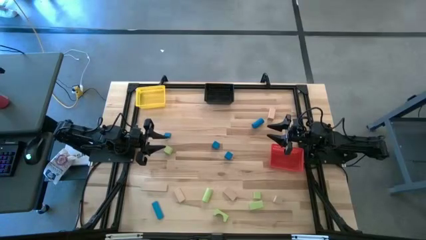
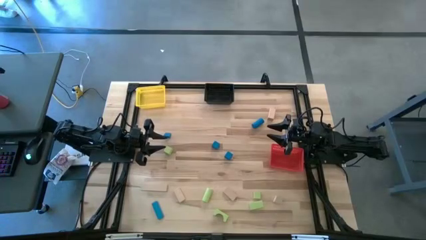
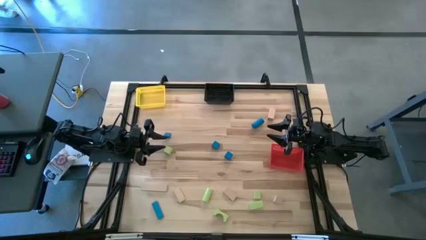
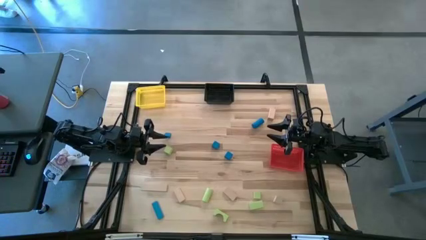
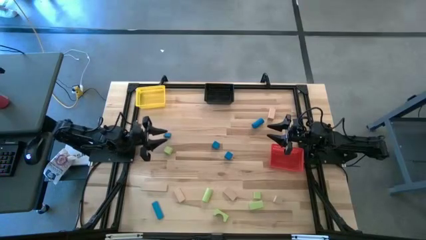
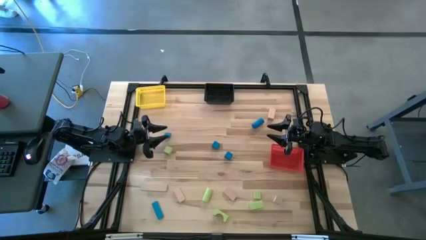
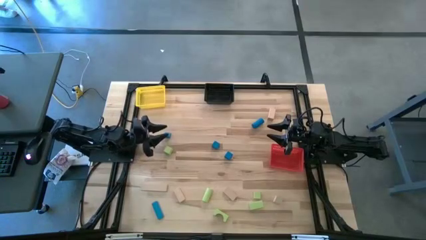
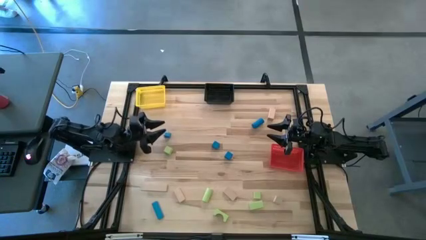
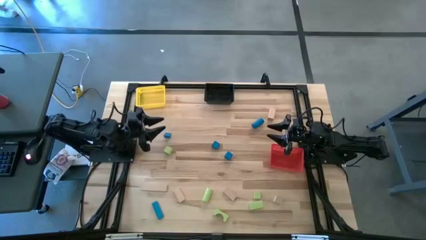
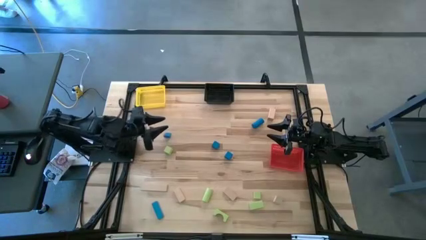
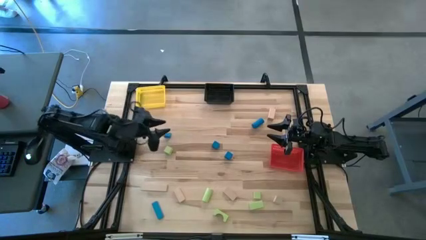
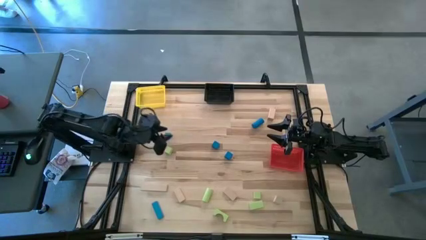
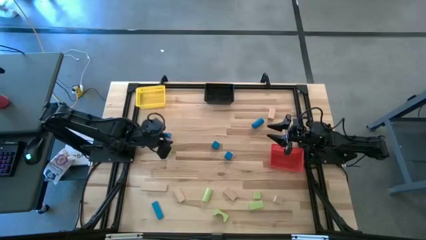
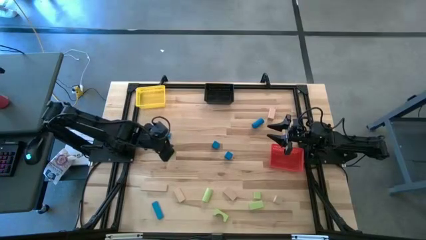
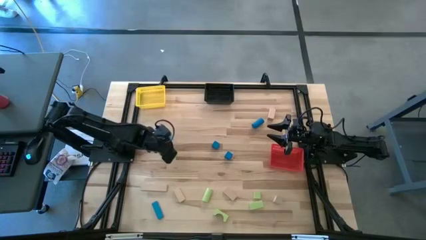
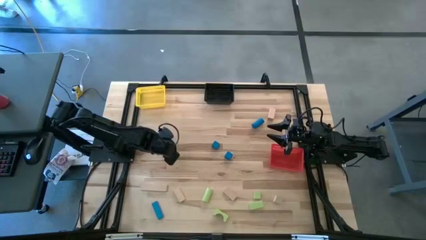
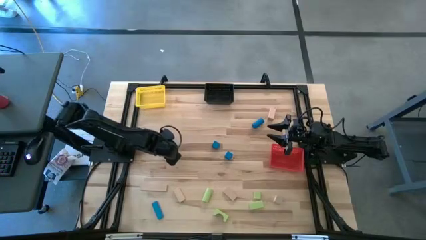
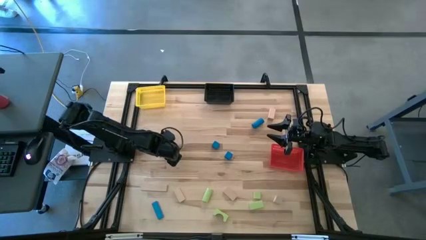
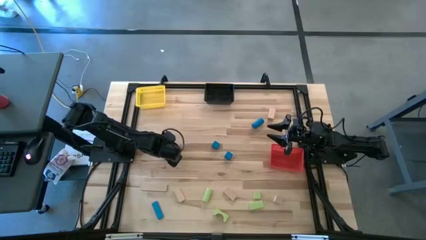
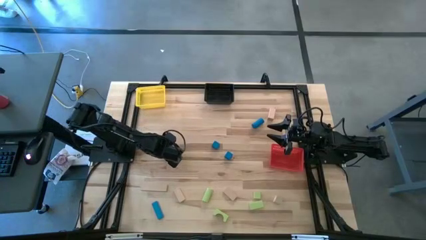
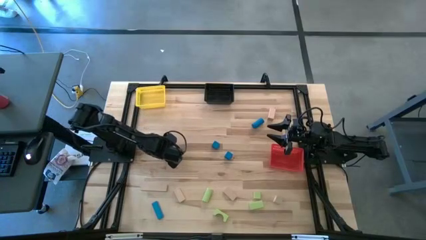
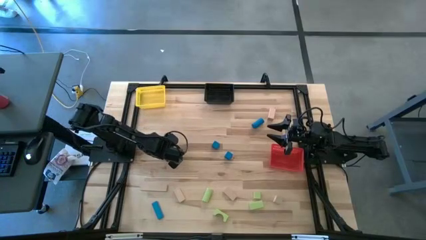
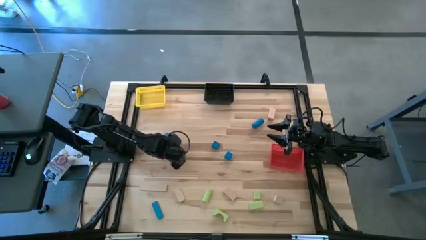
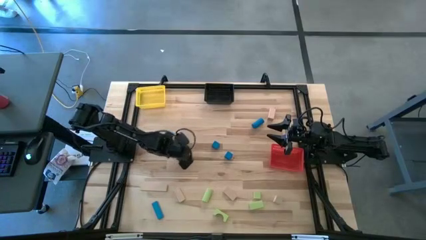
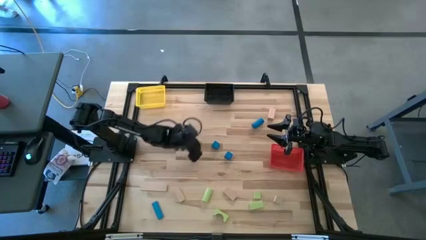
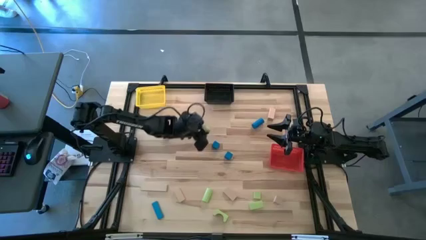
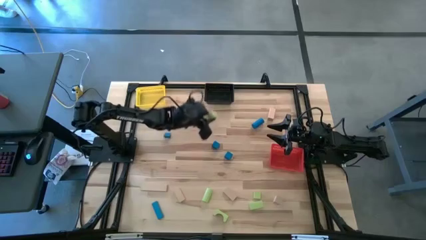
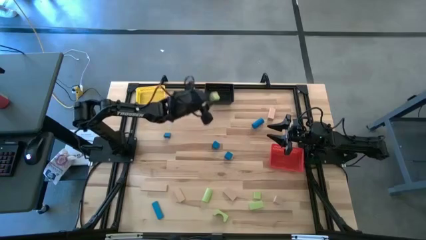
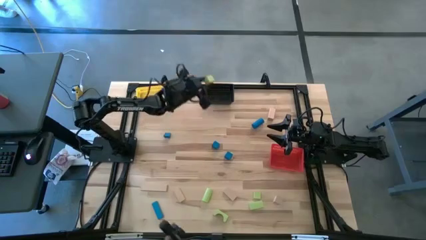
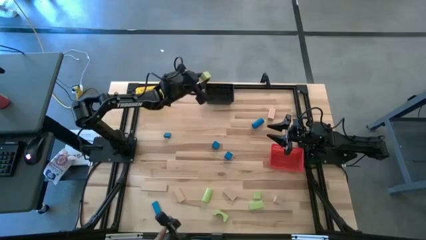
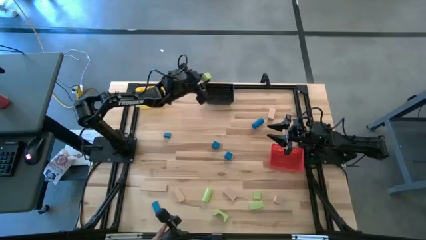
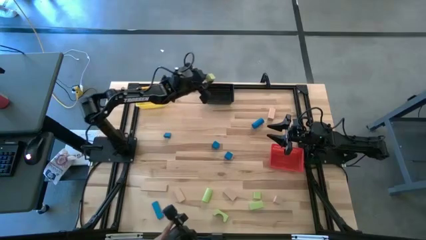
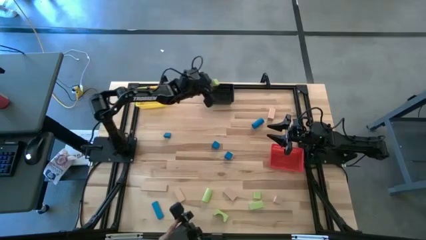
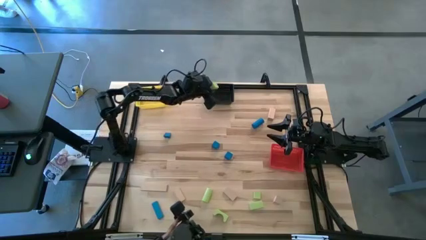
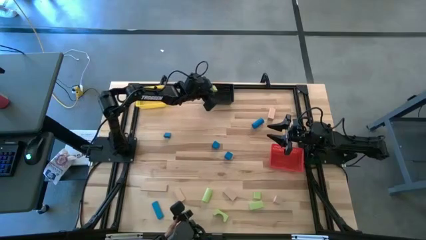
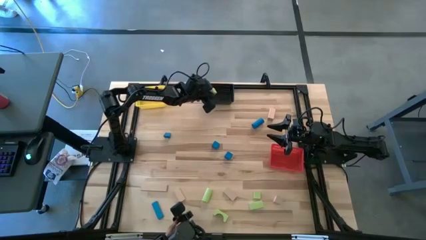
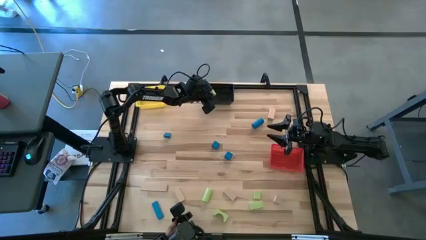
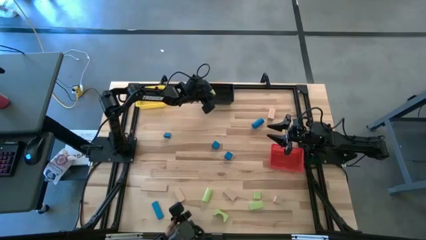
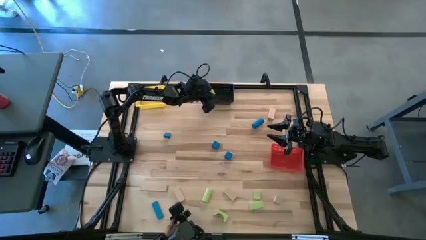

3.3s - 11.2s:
Task: Sort & place blocks by color
Put the green block into the black basket

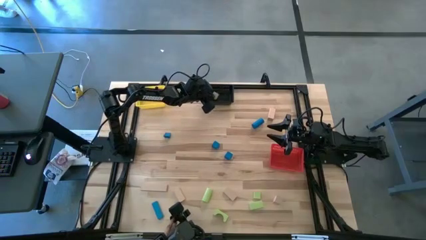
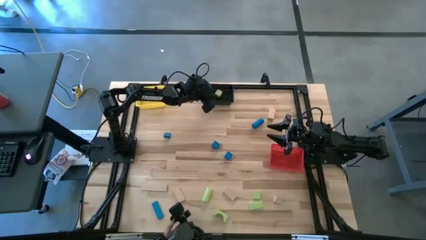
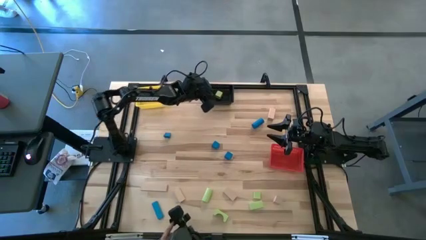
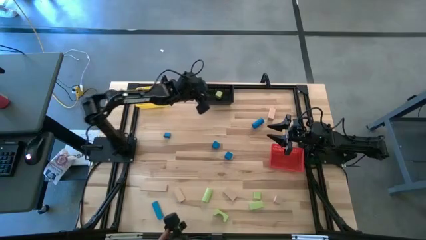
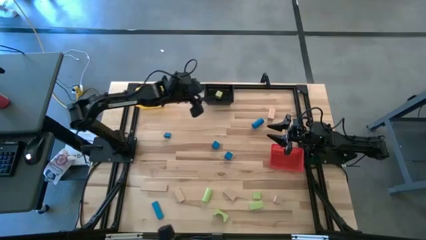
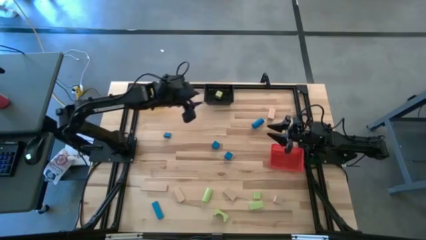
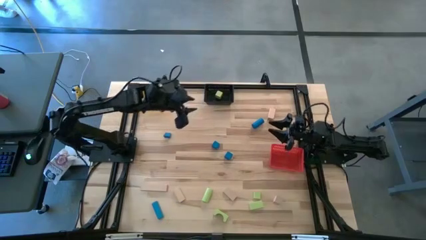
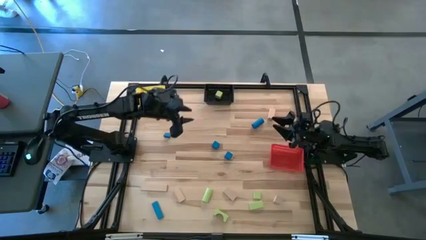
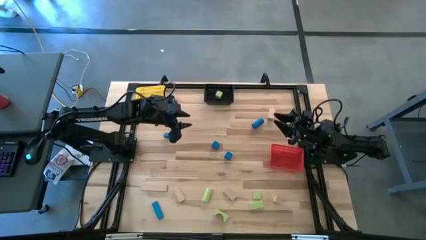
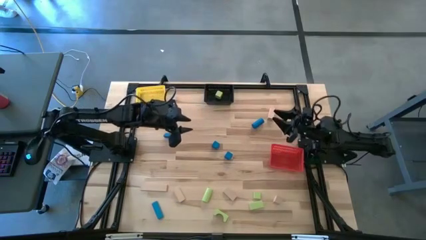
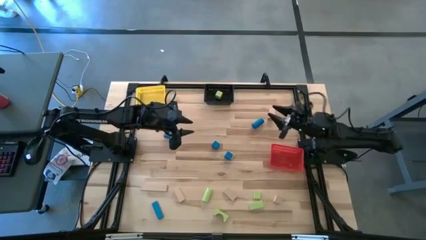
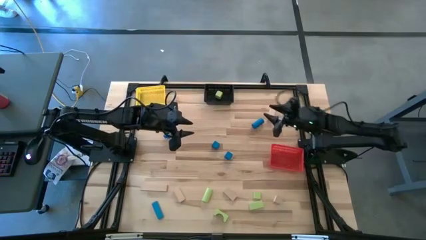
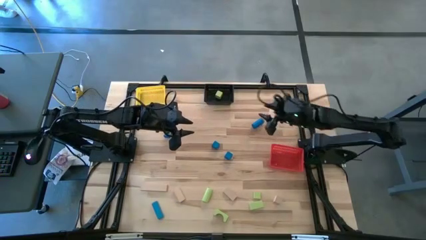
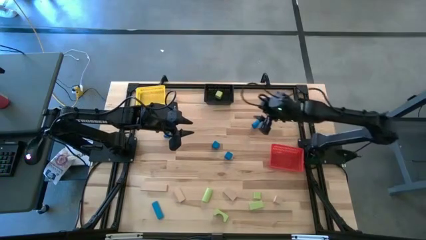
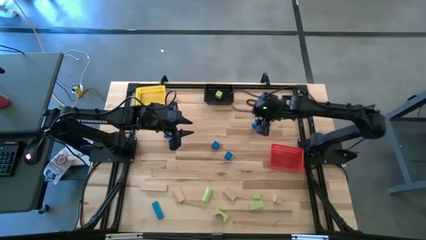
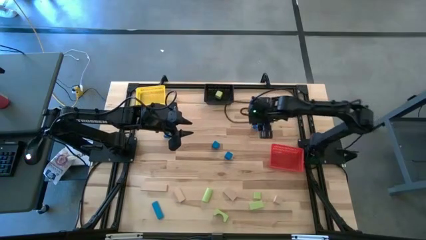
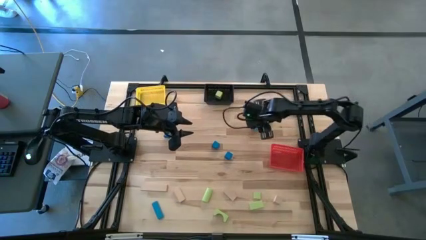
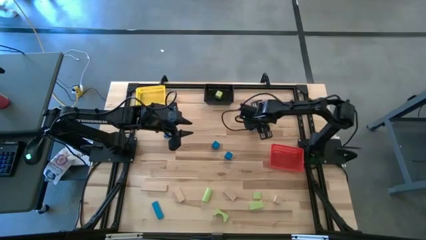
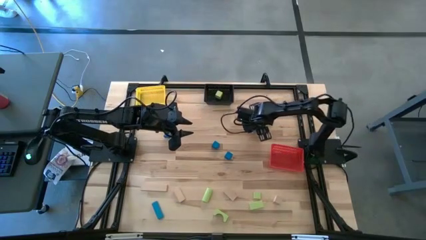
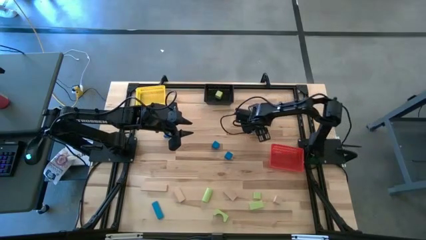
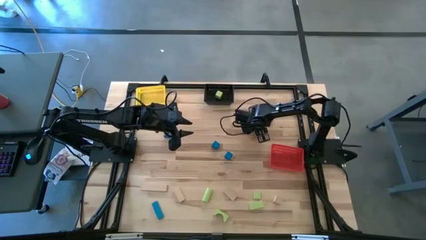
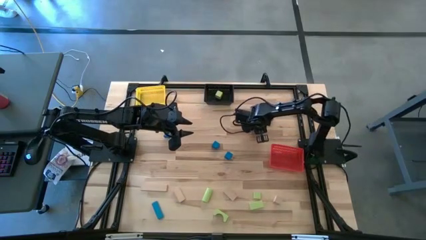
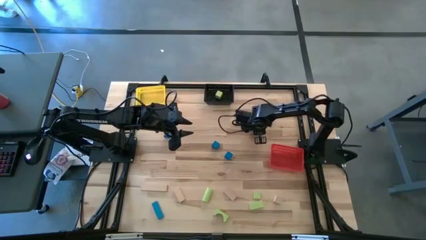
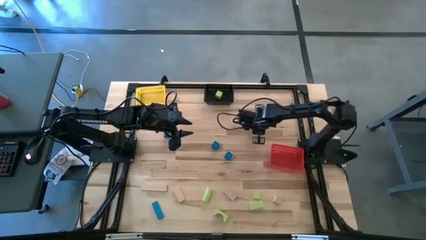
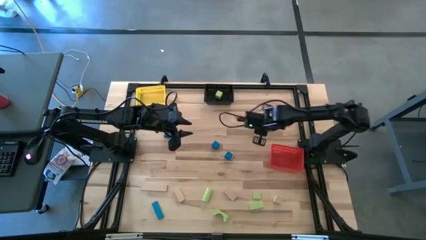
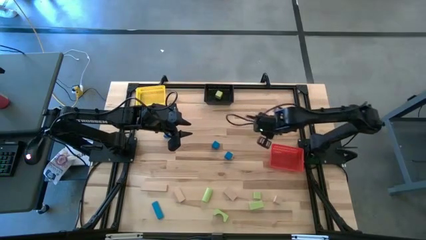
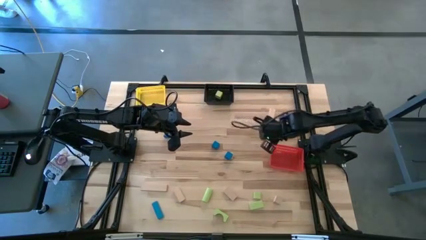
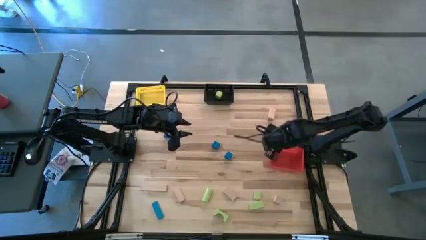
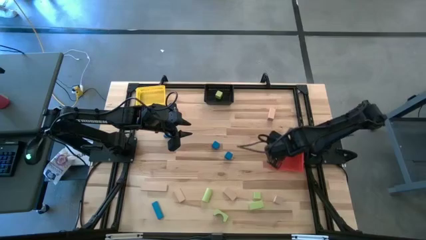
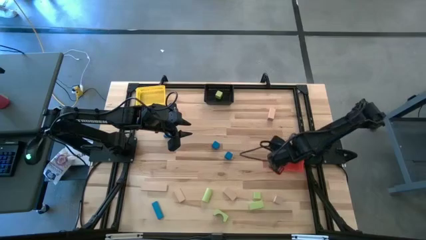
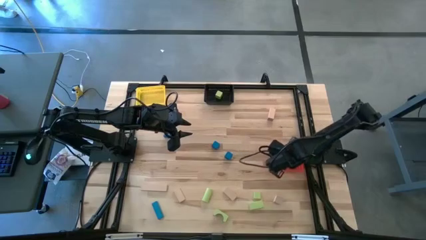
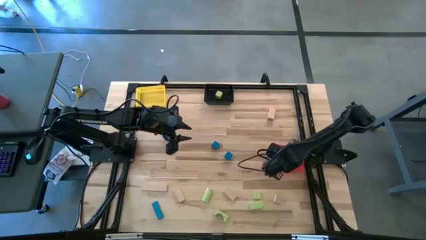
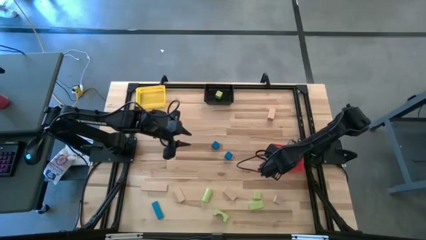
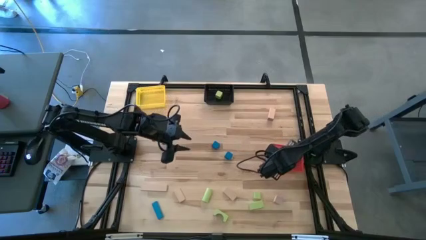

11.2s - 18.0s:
Put the blue block into the red basket

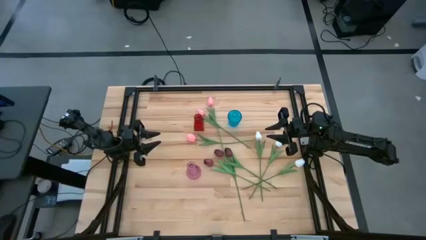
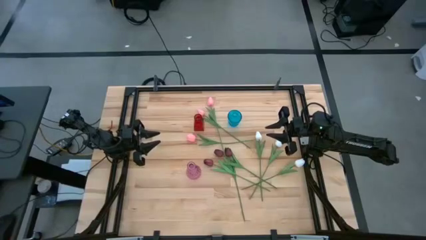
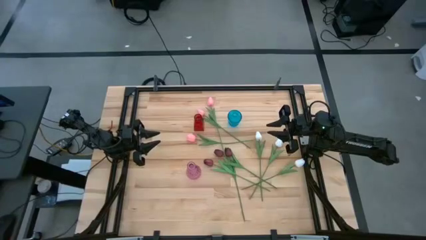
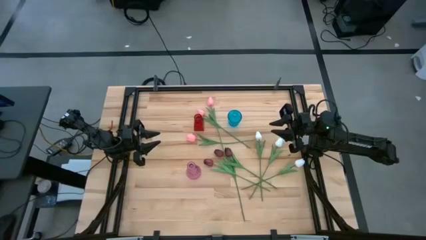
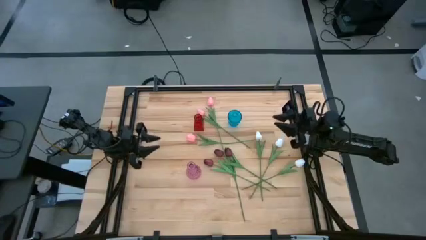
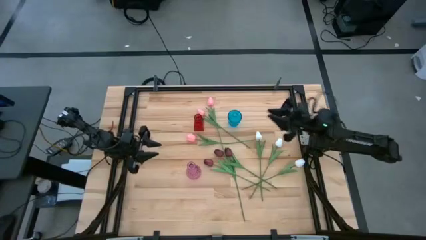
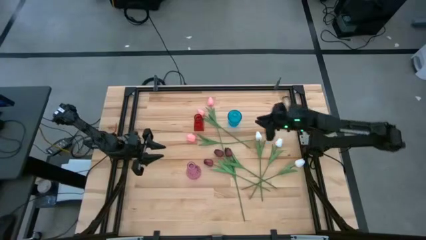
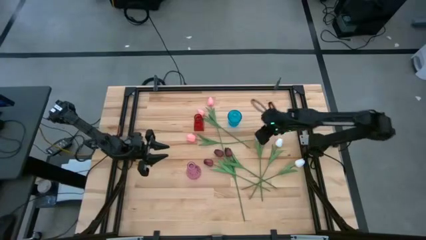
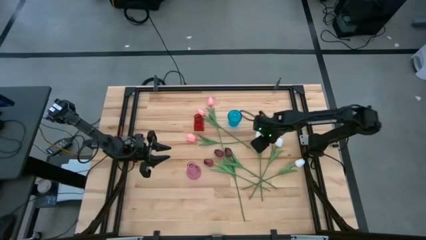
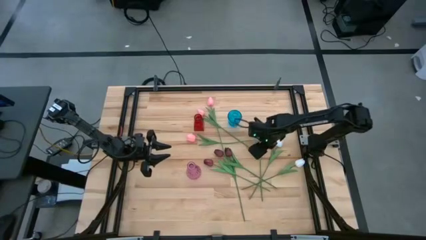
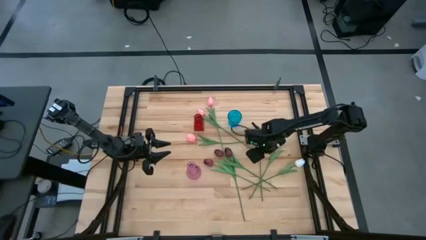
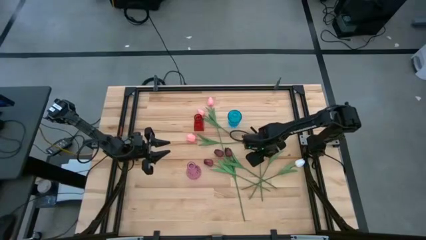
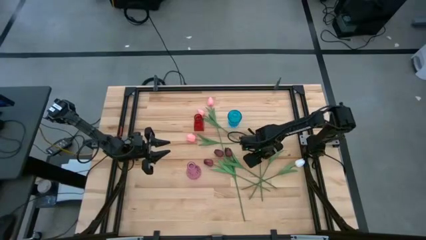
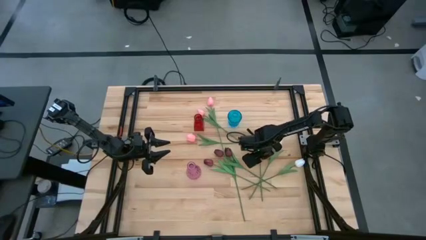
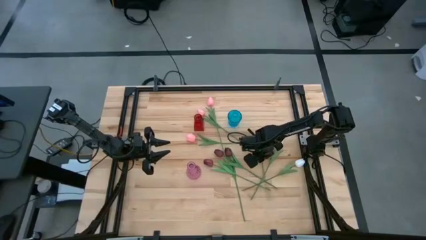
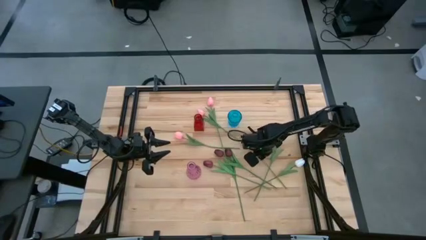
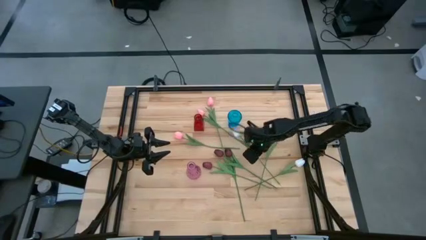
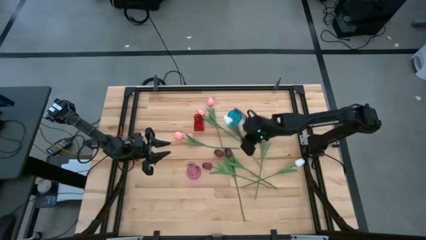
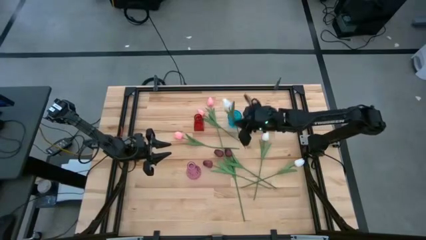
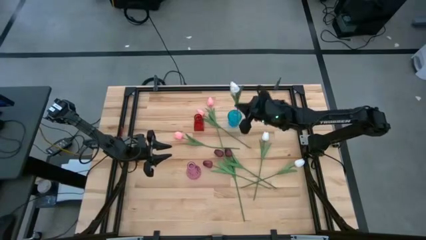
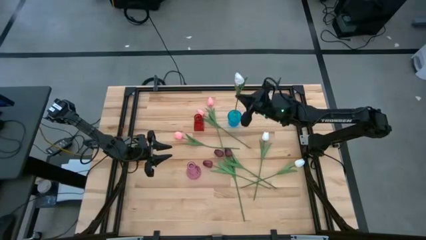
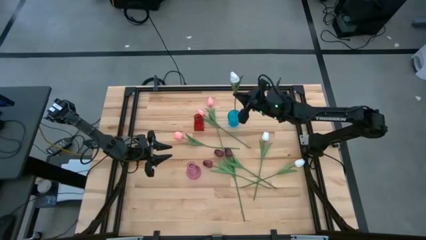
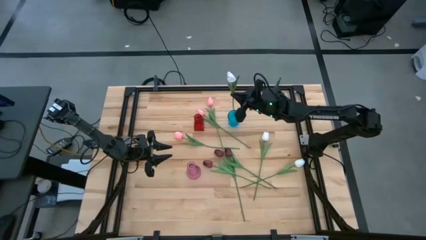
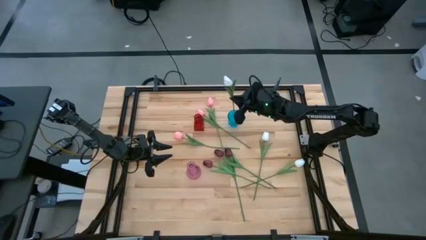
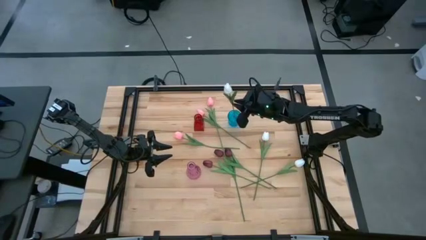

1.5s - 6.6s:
Task: Sort flowers into vase by color
Put the left white flower into the blue vase
